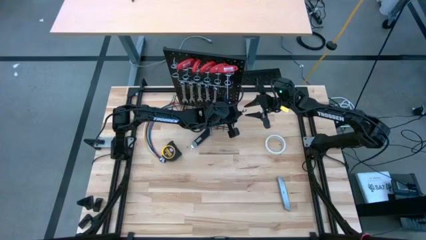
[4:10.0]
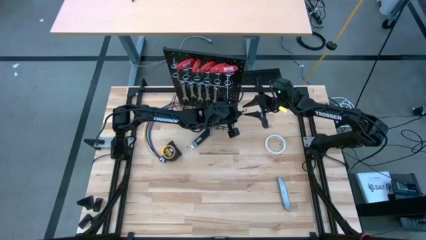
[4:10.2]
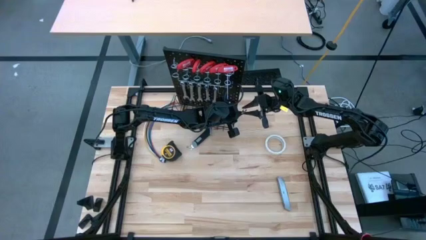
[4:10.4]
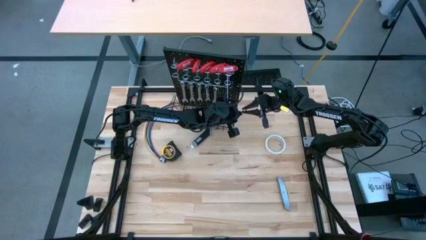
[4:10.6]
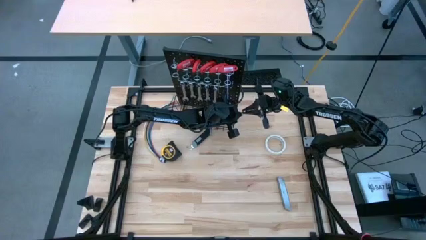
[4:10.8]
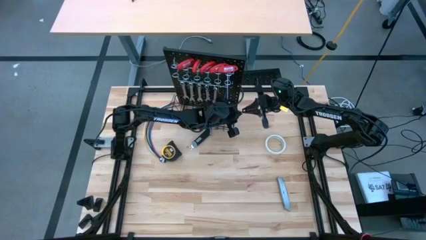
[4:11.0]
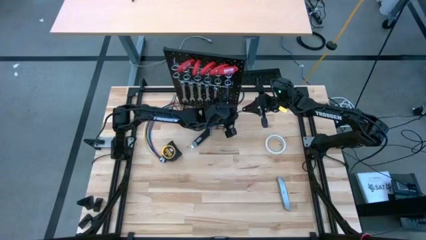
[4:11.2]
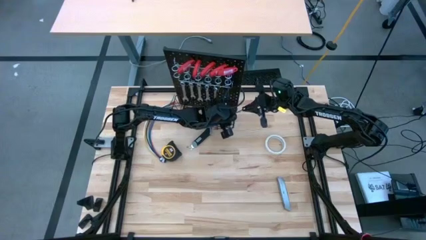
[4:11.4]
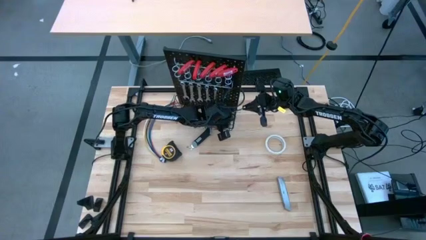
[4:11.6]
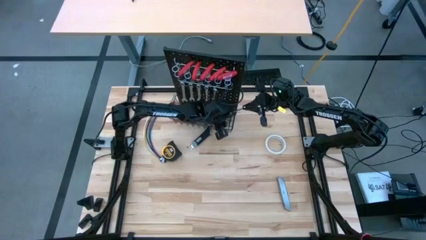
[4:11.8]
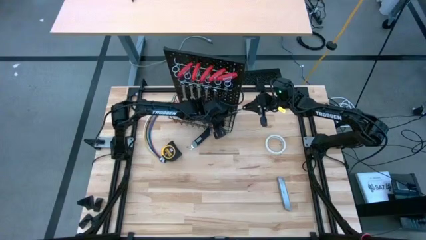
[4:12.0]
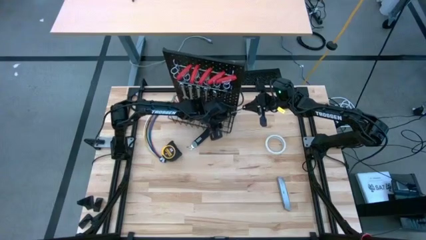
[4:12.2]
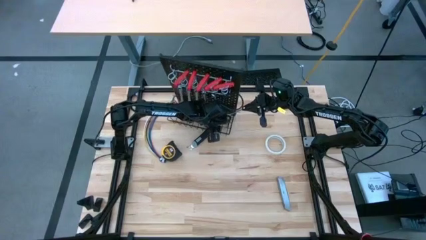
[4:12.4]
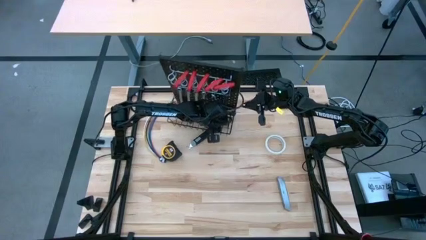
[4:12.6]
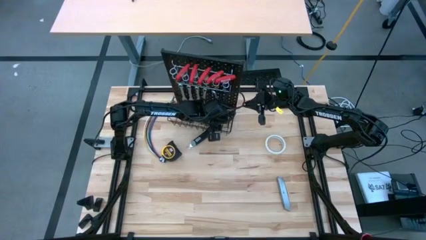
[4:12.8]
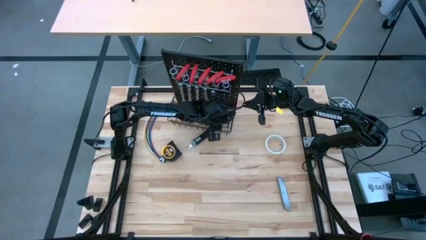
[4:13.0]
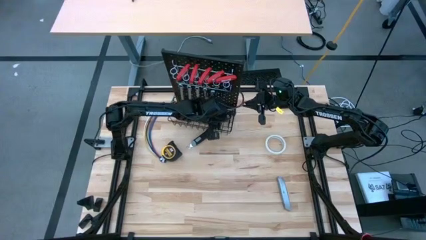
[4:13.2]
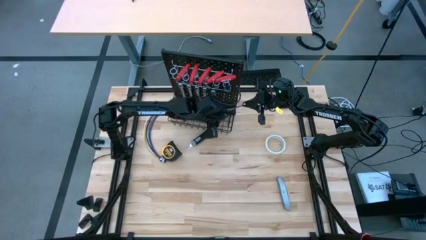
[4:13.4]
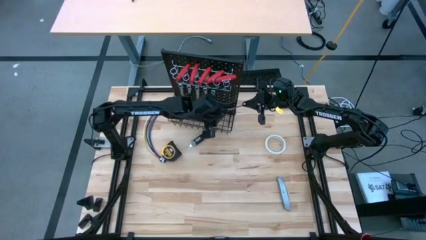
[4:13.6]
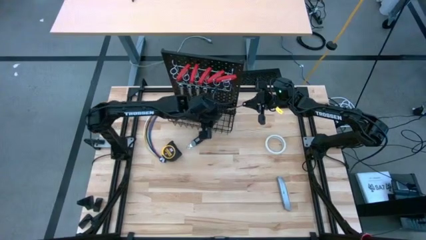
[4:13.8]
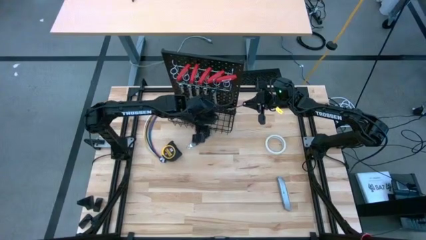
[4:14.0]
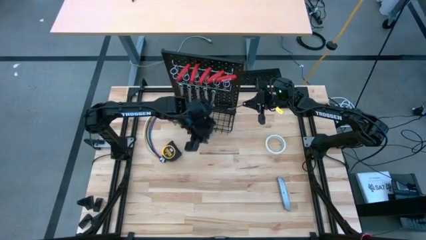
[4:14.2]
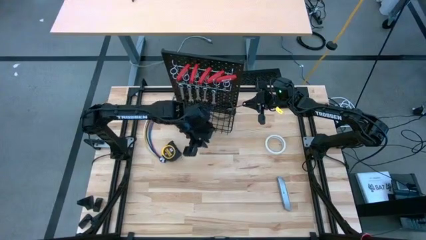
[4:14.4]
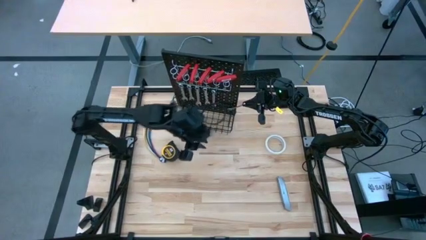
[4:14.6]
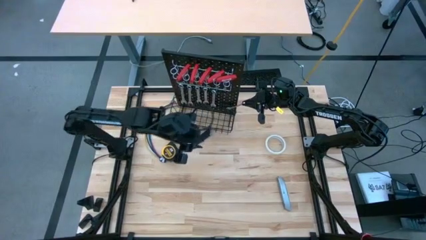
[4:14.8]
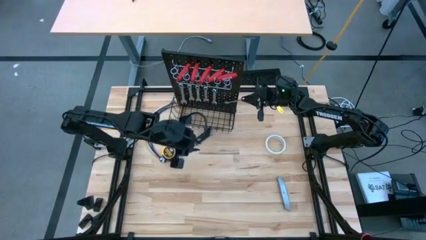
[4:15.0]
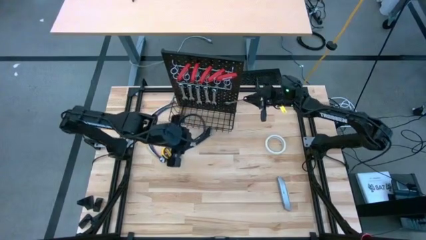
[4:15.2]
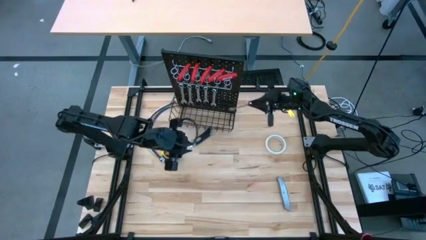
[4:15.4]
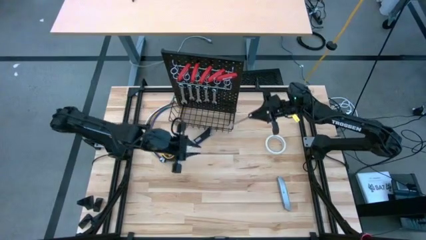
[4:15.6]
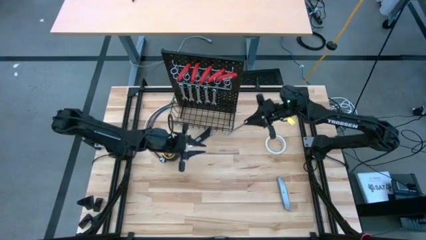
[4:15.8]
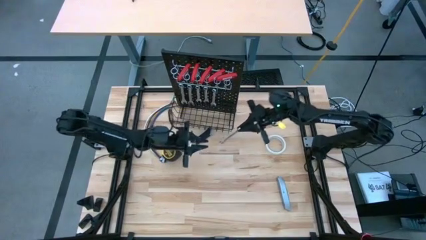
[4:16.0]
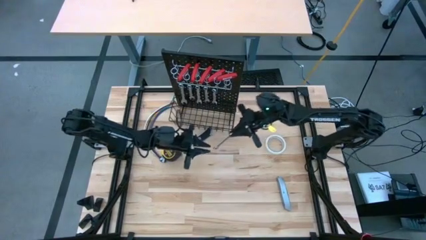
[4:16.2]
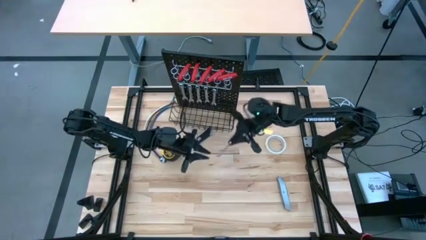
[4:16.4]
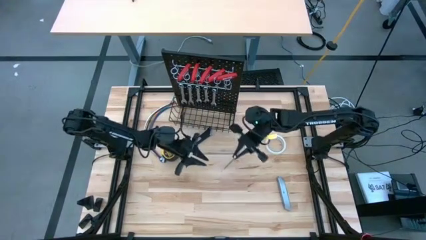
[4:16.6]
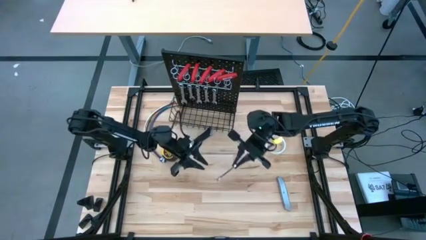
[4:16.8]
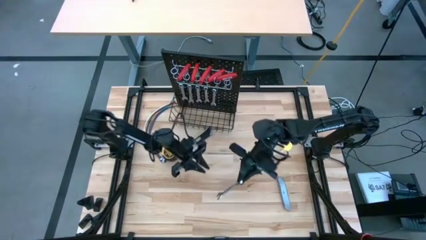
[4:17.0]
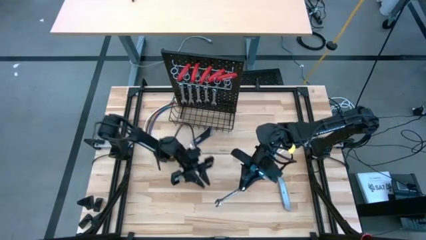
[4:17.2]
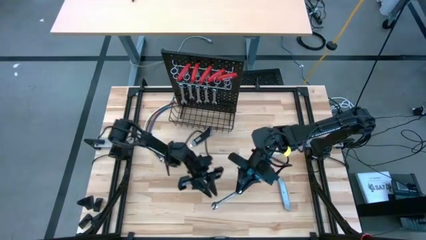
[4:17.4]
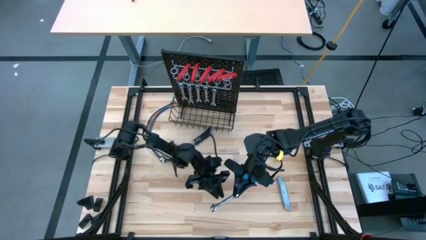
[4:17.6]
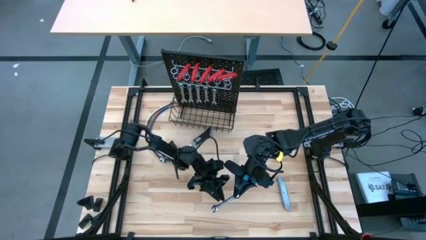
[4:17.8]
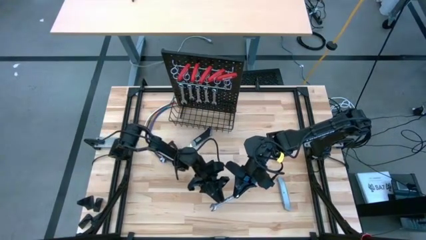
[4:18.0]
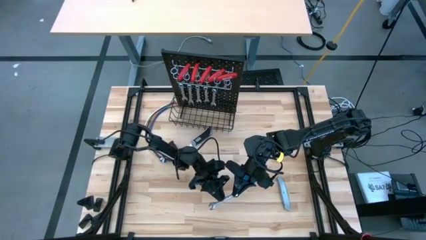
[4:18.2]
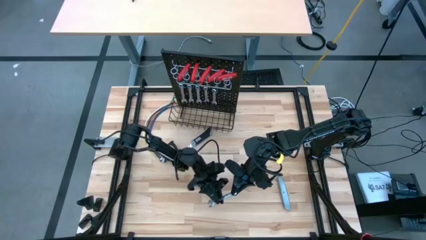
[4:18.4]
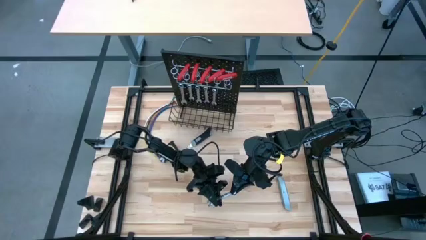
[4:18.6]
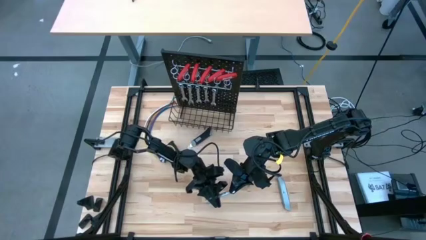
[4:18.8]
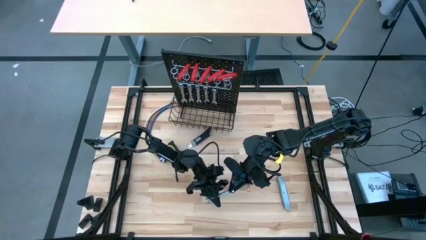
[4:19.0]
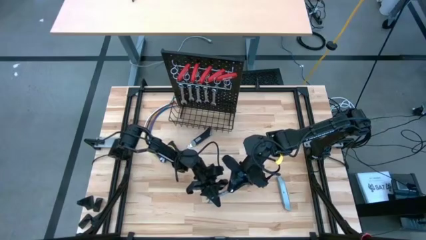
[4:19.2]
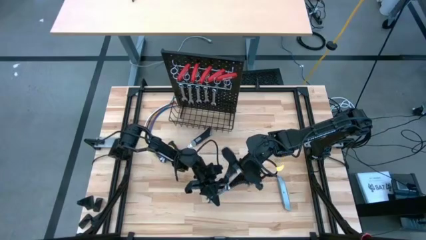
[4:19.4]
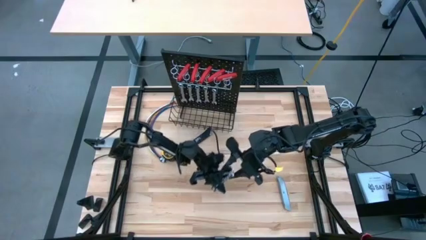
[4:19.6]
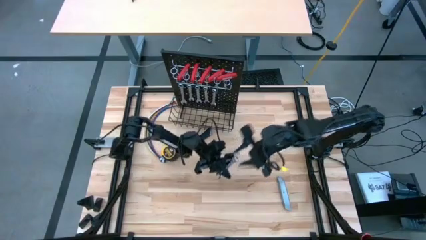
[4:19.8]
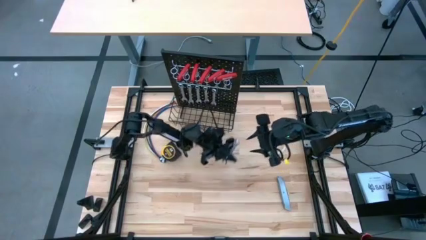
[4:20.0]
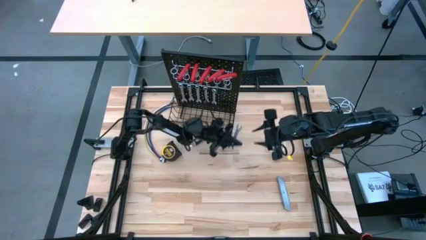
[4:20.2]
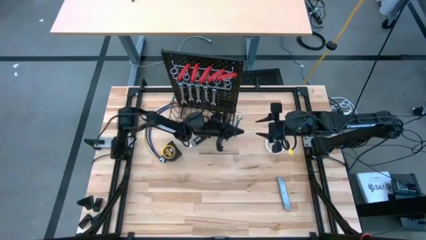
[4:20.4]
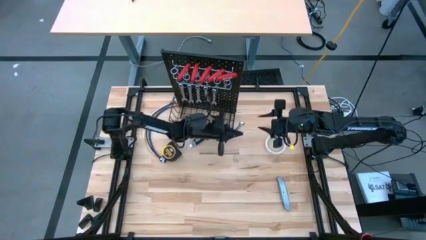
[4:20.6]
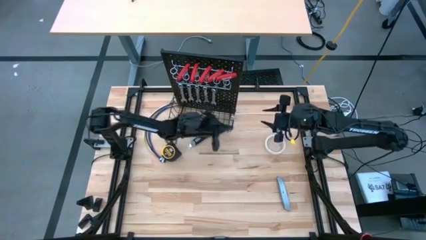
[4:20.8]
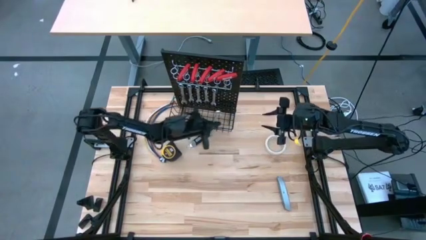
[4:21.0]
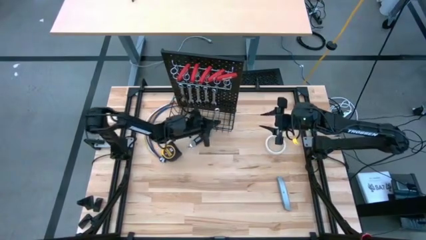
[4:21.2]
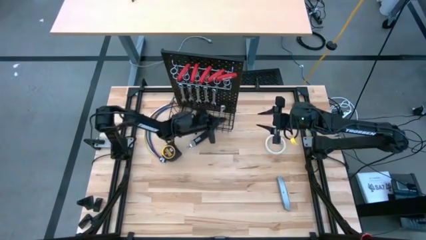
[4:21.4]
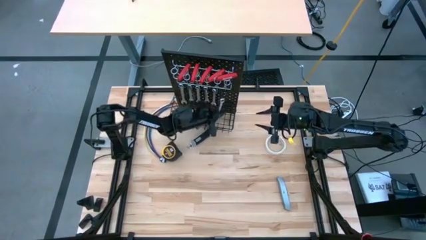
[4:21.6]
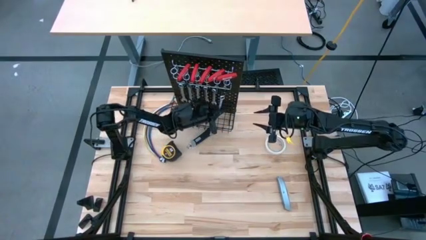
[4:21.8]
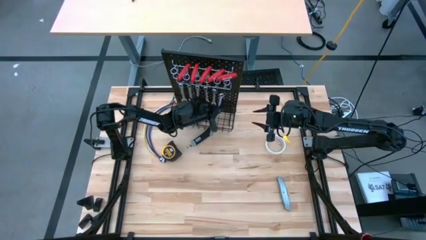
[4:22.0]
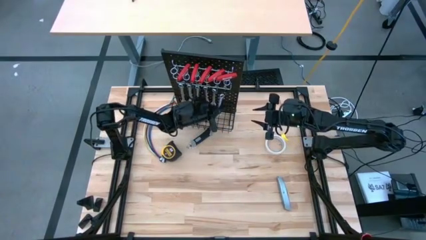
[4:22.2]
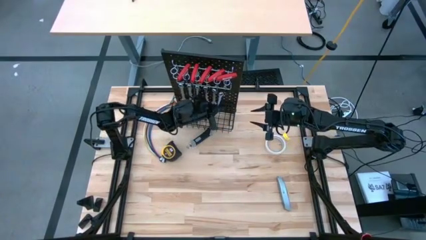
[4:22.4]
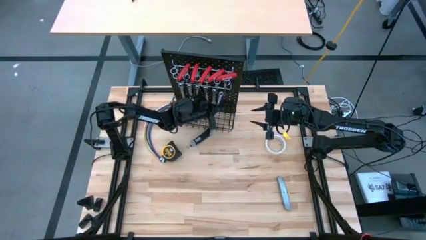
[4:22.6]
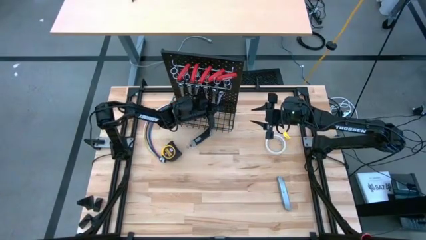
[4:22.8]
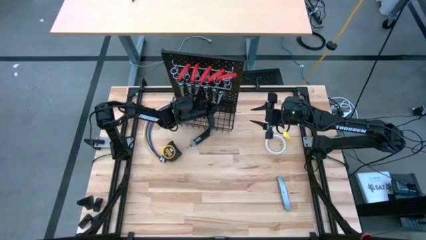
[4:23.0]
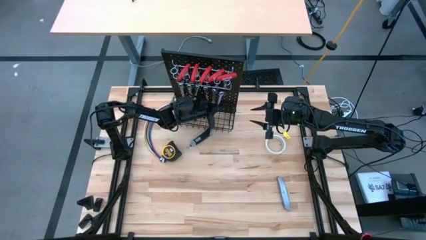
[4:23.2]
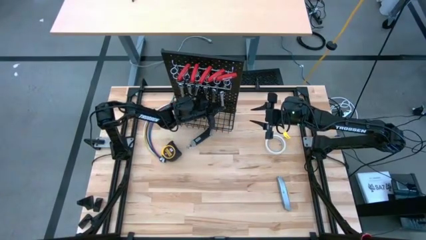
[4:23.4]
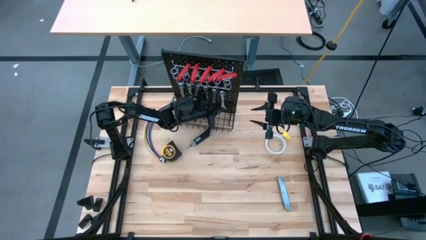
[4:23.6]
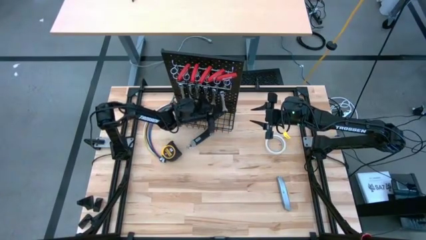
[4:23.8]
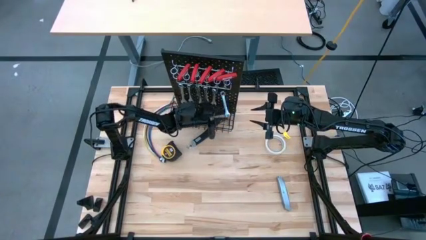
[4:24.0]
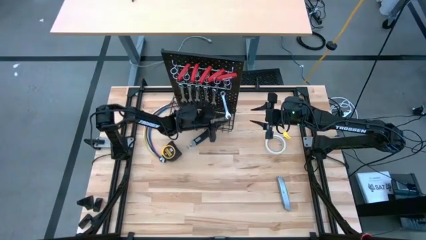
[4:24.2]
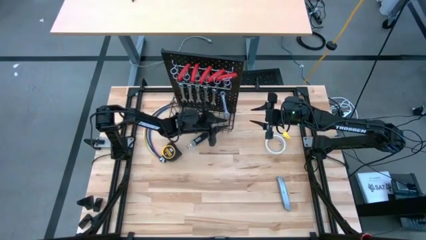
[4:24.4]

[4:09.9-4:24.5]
Task: Hang tools onto peg board
Hang the wrench on the peg board

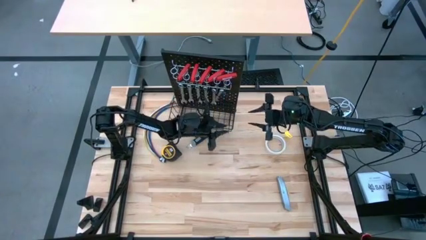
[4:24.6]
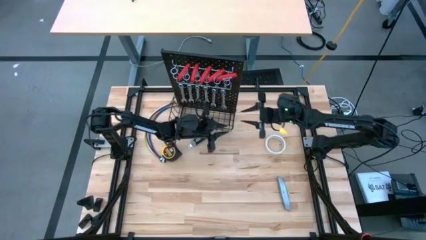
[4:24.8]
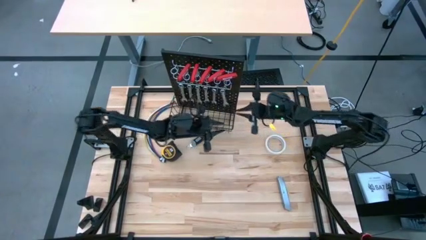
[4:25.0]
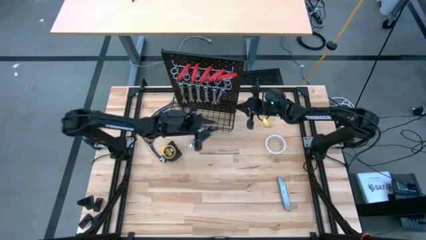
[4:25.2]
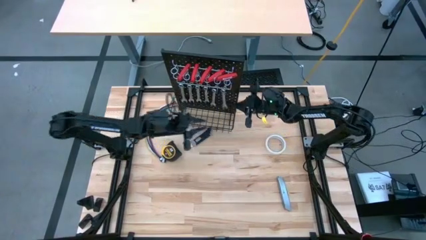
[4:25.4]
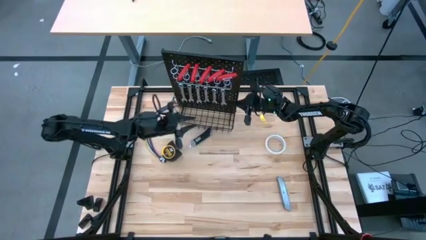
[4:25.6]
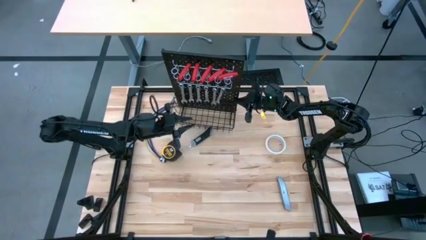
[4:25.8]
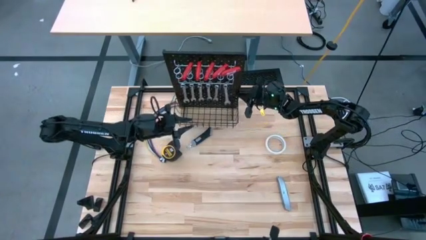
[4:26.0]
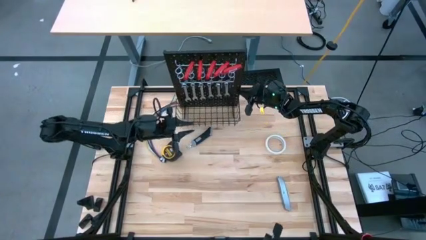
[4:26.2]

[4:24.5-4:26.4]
Adjust the peg board on the table
